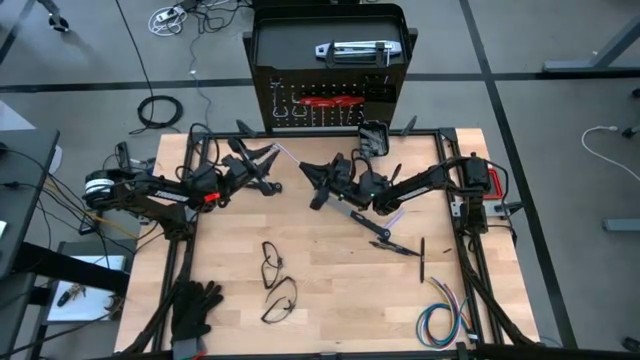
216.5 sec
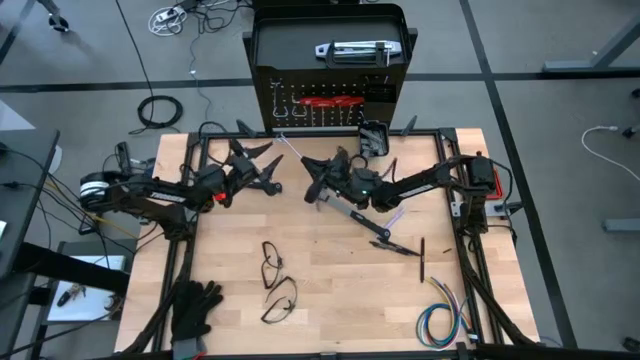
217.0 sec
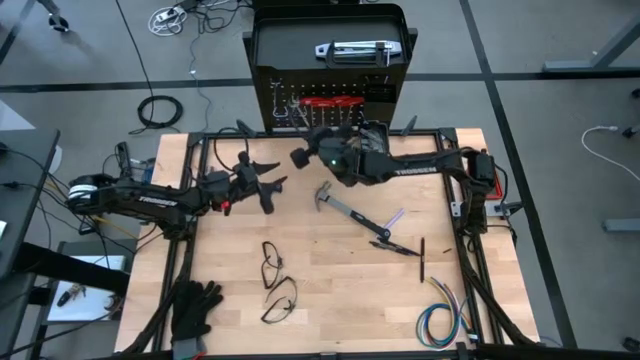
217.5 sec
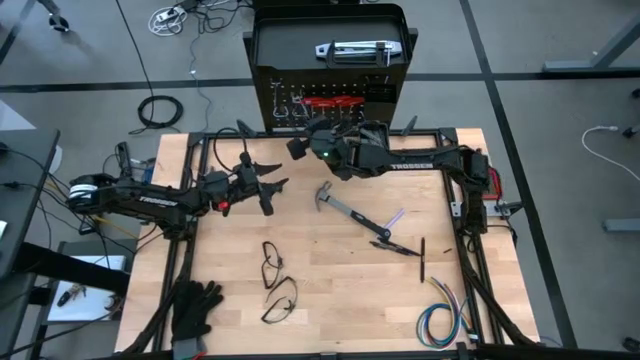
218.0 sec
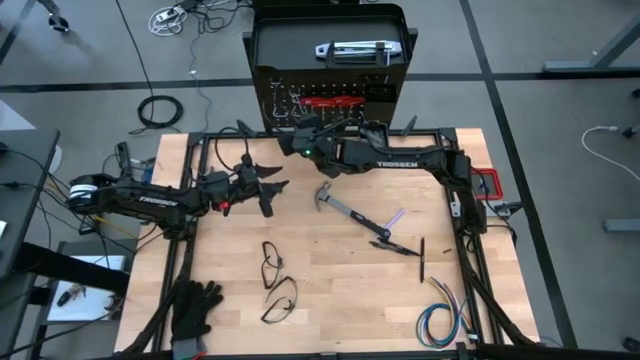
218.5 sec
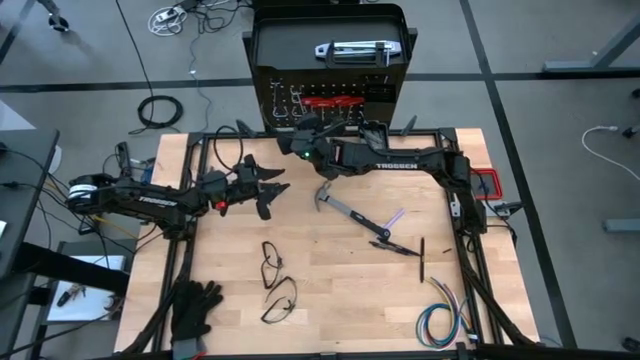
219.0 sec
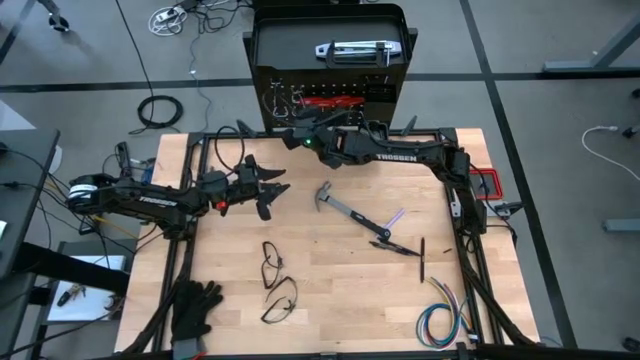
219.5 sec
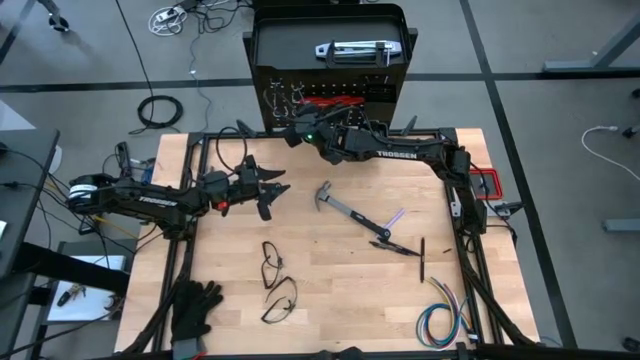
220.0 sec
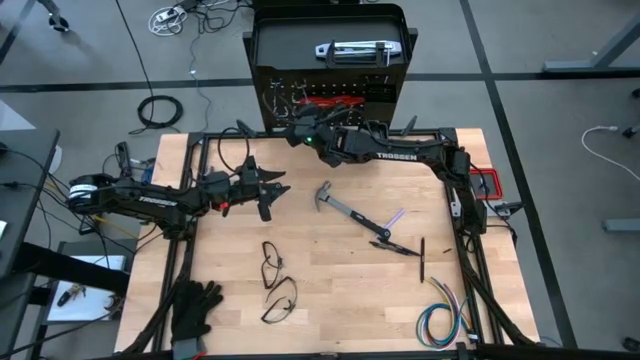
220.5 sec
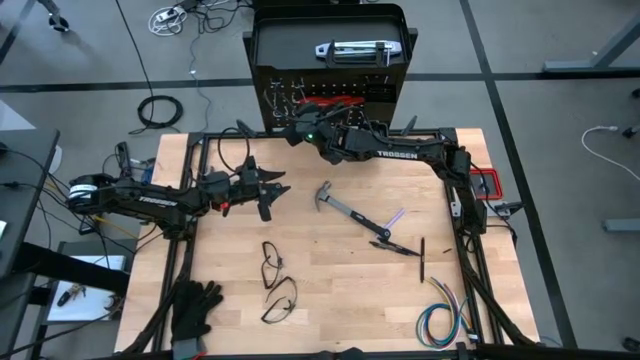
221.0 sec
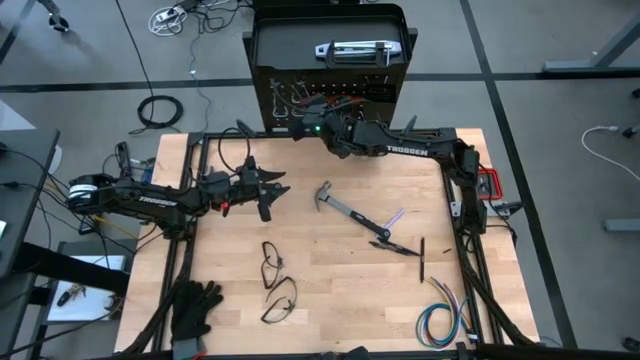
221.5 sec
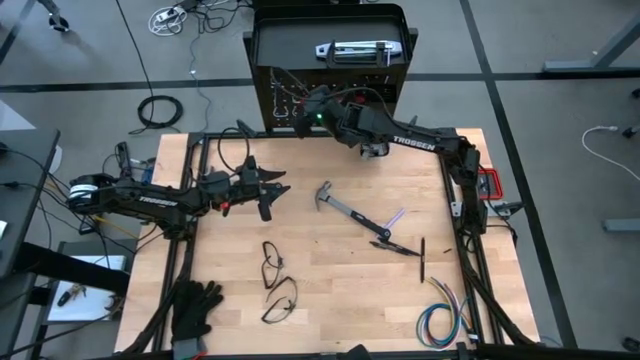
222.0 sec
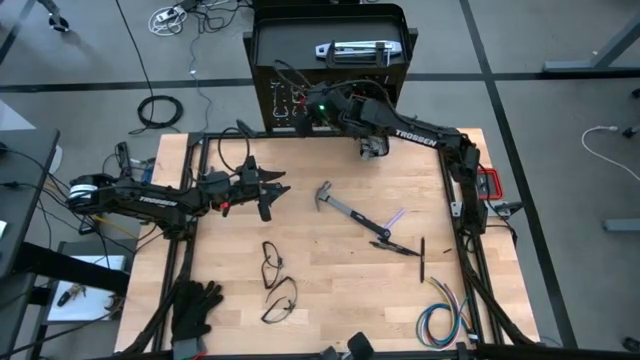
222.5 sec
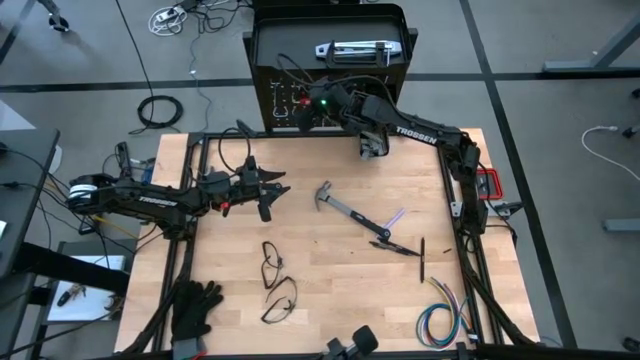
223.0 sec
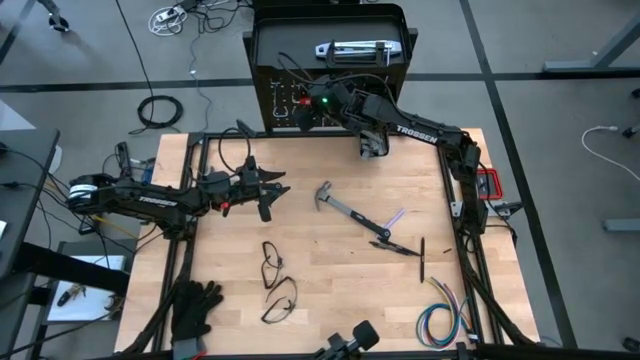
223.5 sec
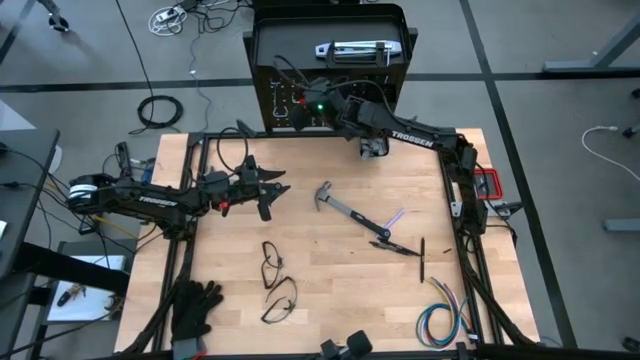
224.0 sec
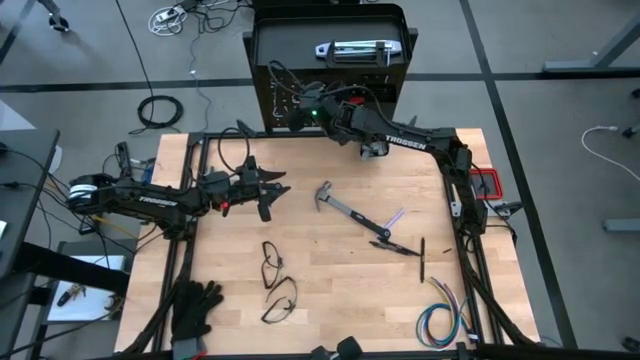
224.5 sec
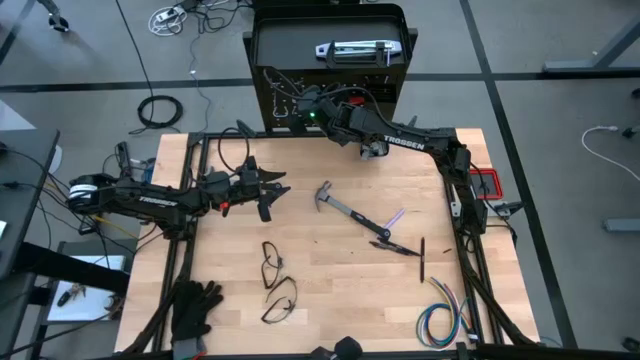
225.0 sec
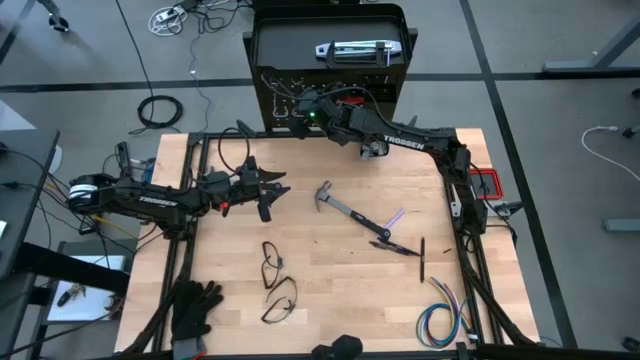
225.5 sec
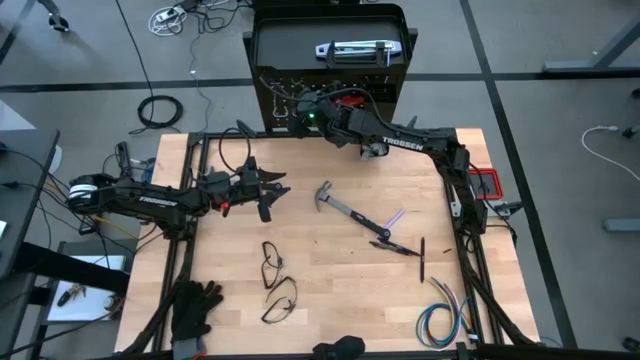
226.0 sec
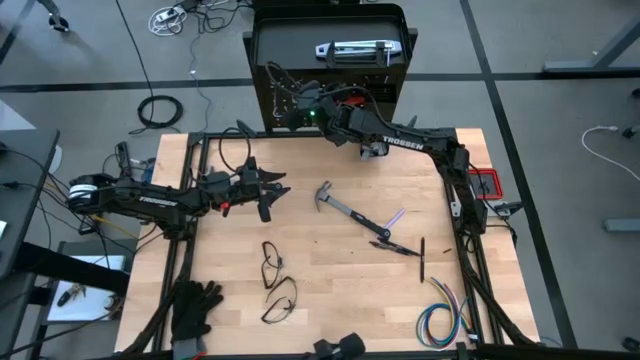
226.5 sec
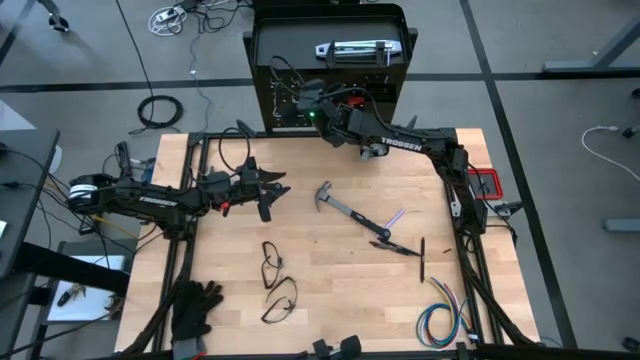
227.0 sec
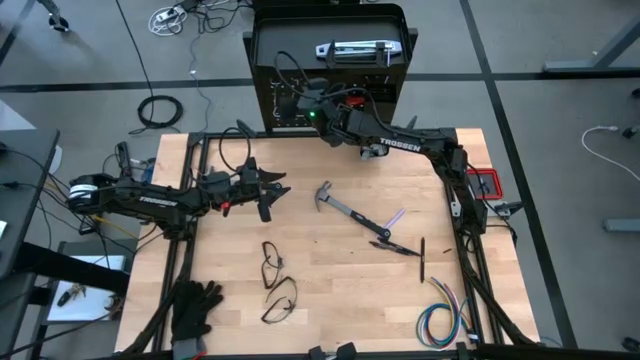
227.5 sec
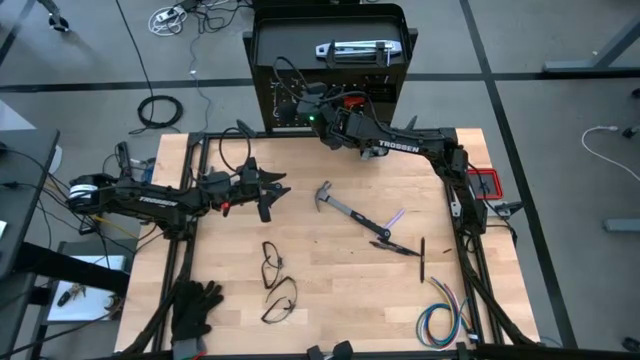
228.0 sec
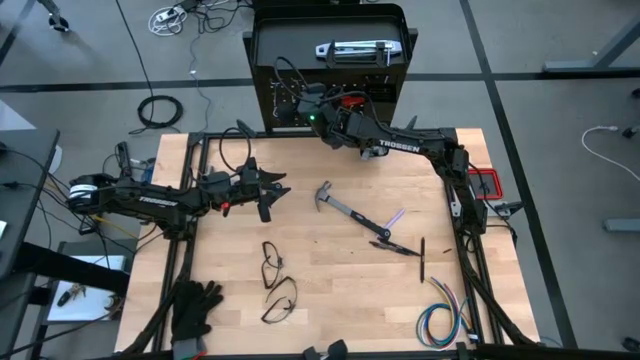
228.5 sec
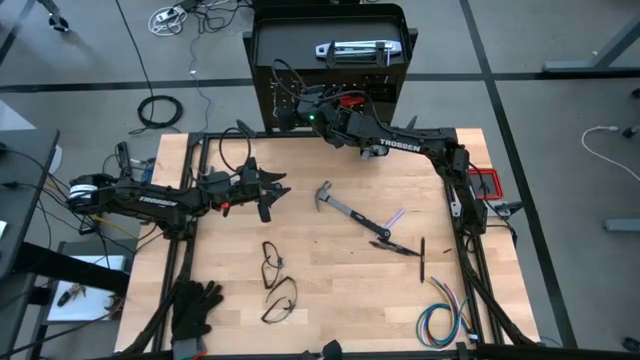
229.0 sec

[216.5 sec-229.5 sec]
Task: Hang tools onto peg board
Move the hook from bottom to top

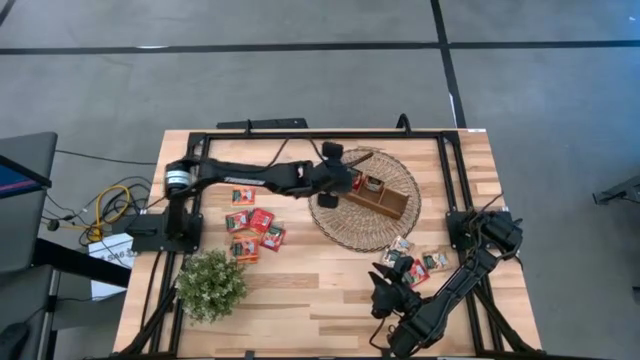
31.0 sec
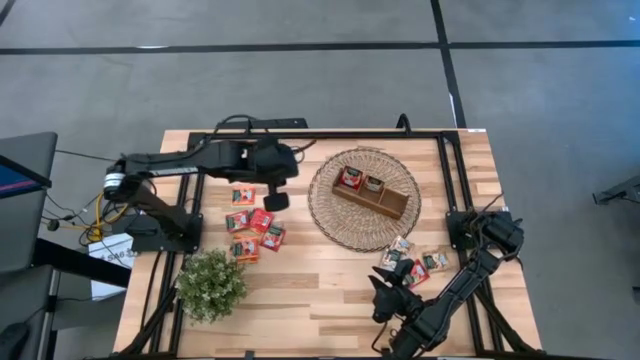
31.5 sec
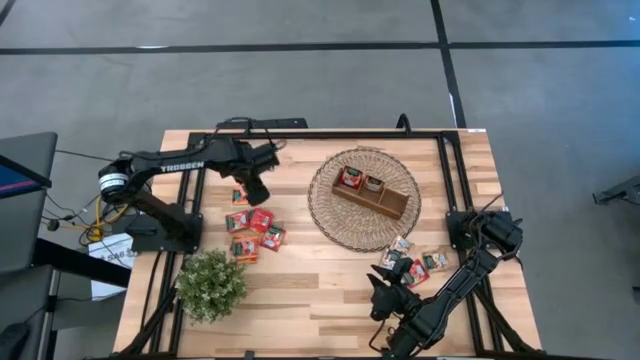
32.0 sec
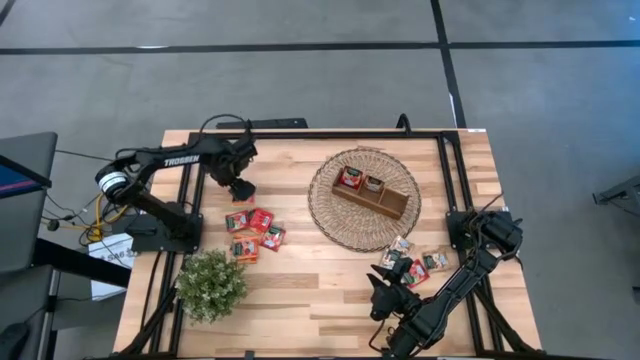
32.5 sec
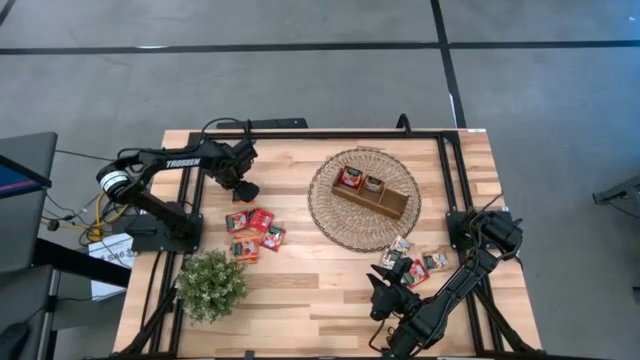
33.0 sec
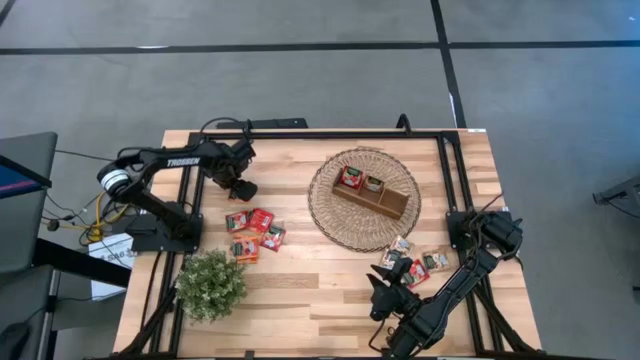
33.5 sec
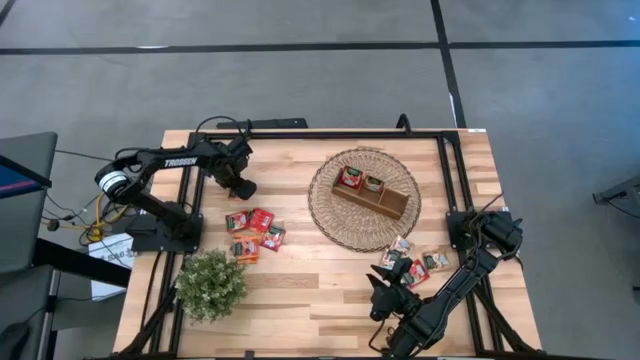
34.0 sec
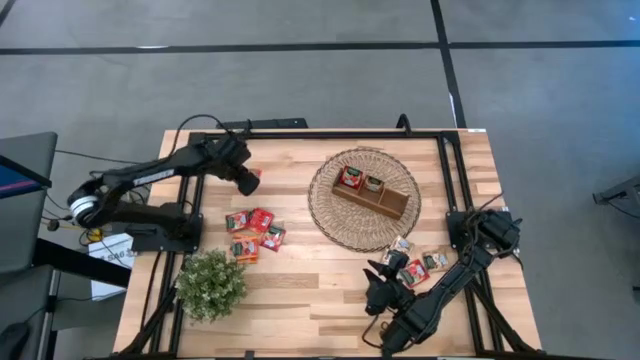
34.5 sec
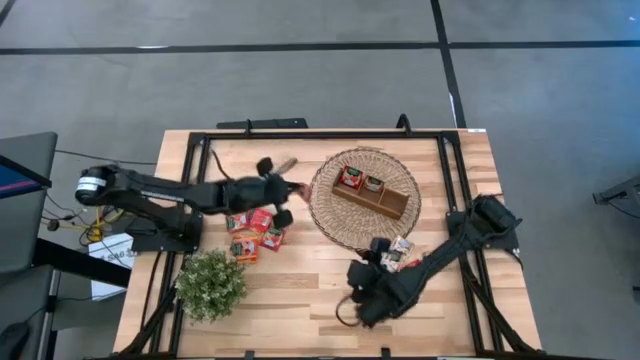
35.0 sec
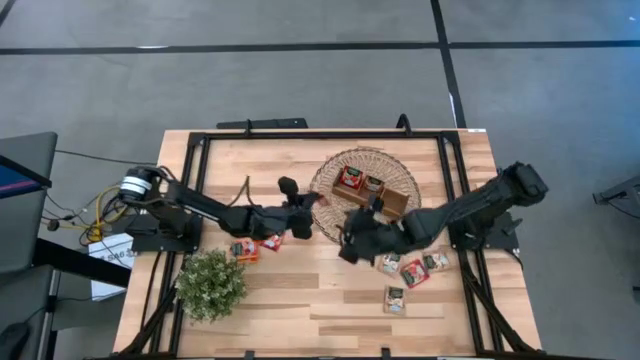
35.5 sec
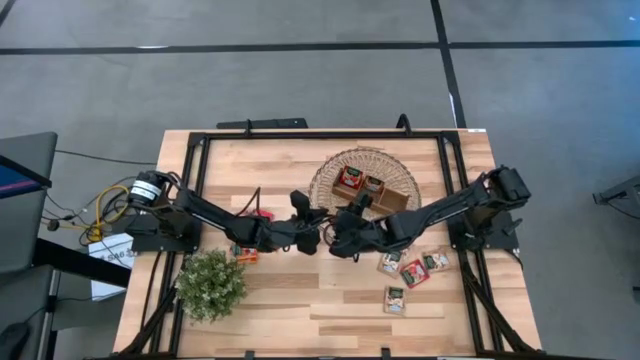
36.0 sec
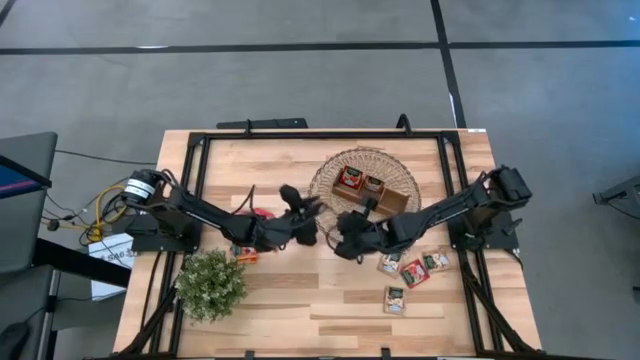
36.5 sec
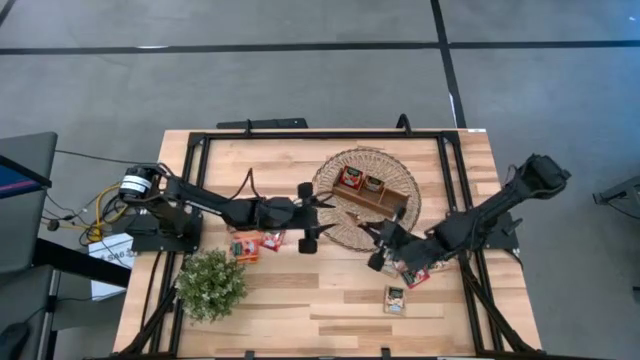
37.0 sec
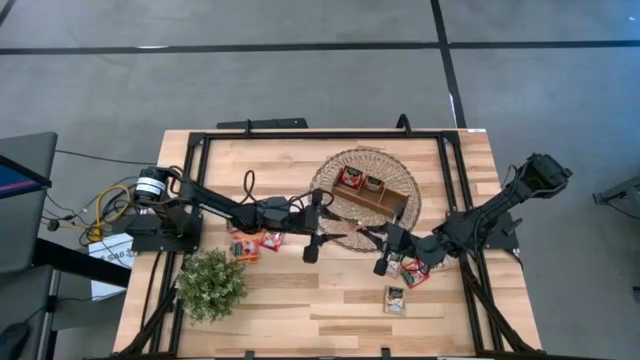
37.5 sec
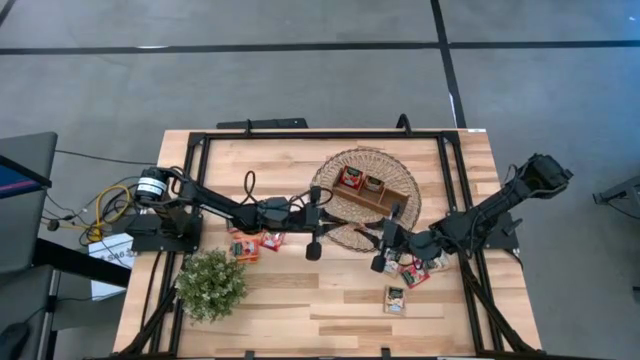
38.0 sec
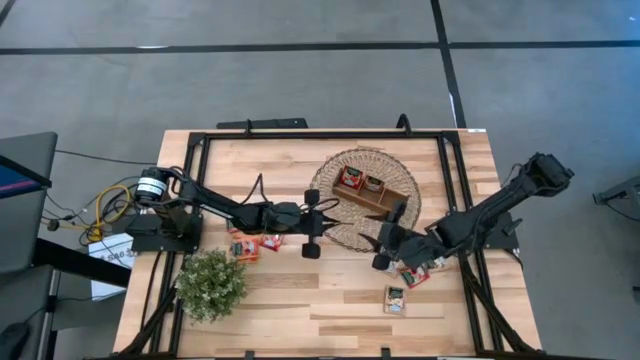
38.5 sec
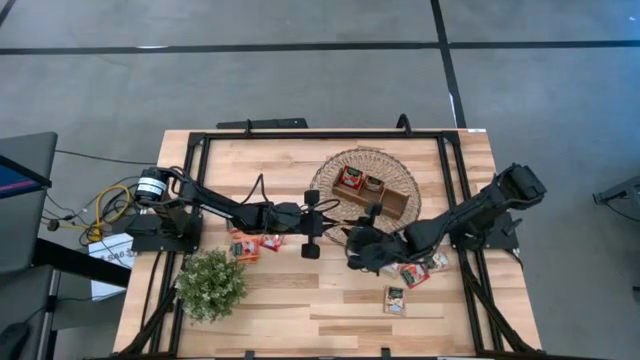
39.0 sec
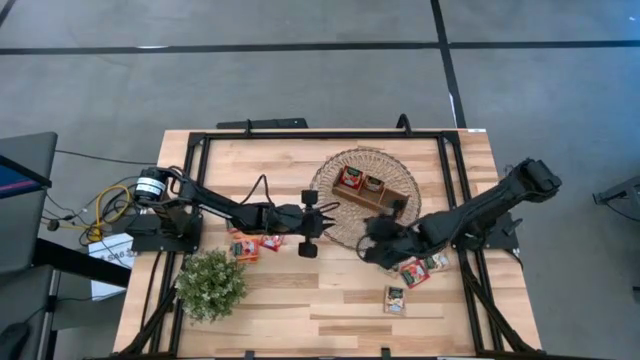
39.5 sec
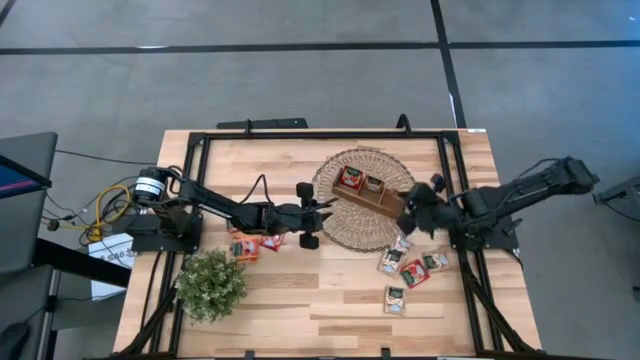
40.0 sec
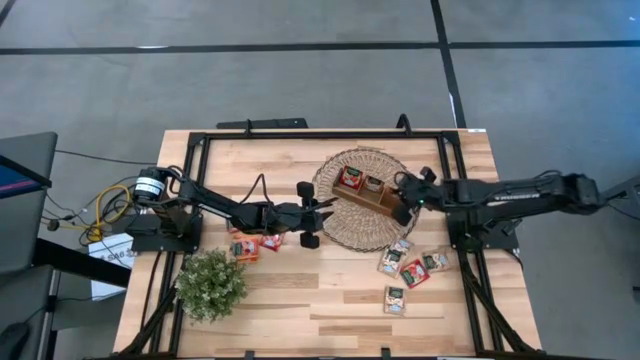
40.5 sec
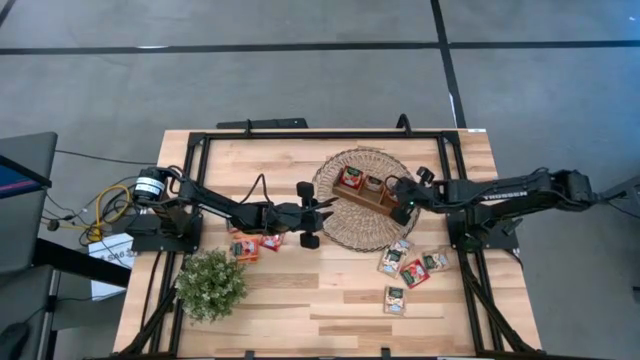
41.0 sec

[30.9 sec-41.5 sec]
Task: Pick & Place Tea
Put the orange tea bag into the right section of the wooden organizer
